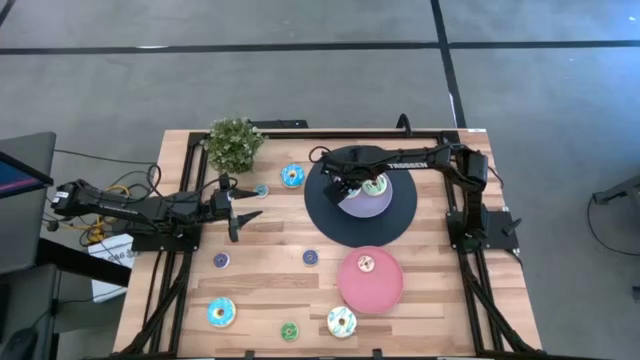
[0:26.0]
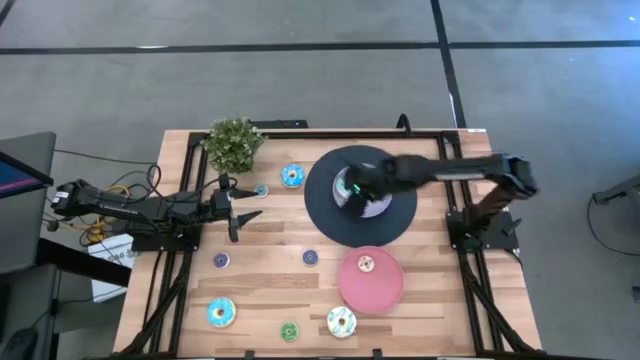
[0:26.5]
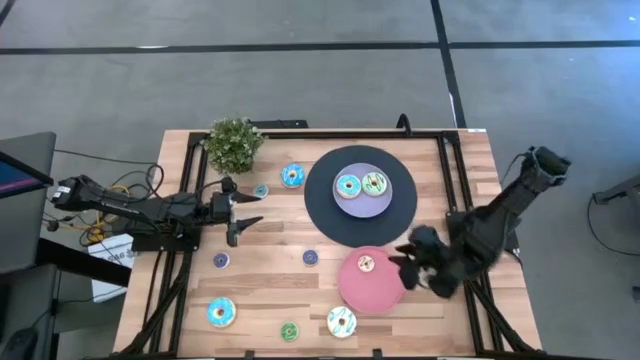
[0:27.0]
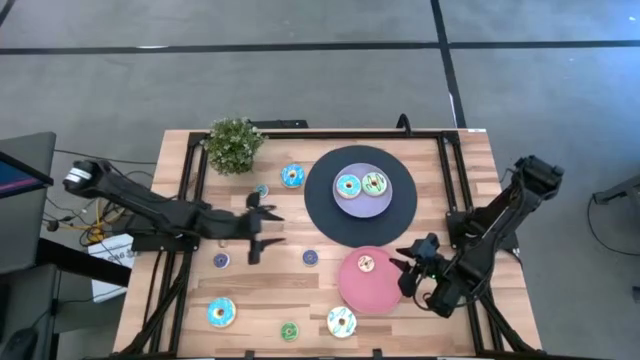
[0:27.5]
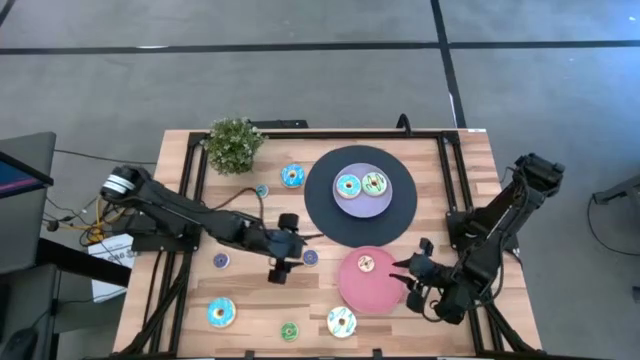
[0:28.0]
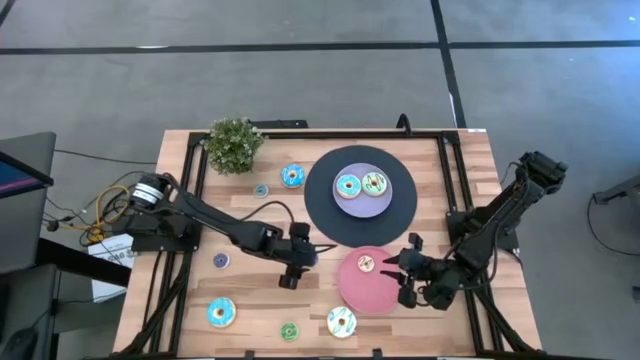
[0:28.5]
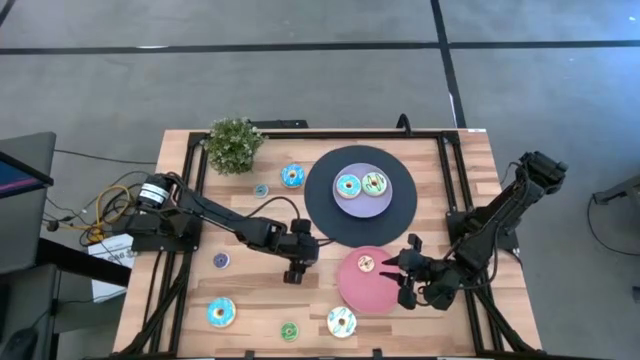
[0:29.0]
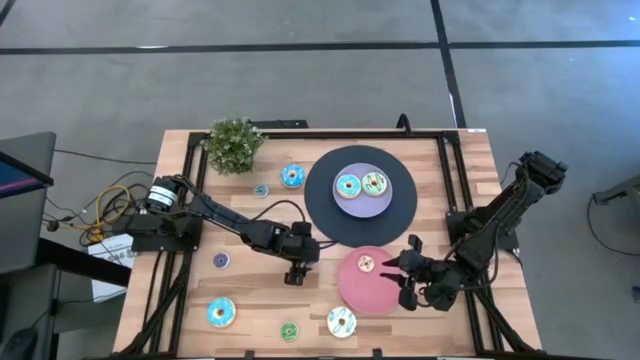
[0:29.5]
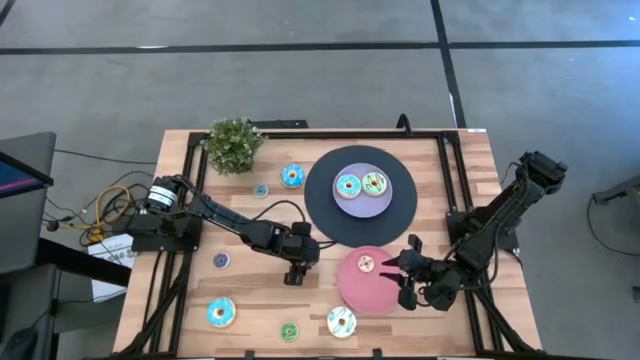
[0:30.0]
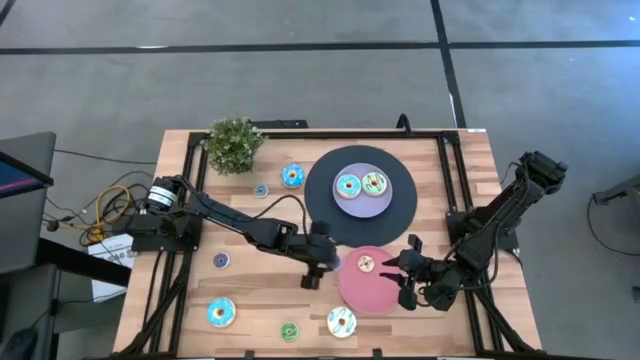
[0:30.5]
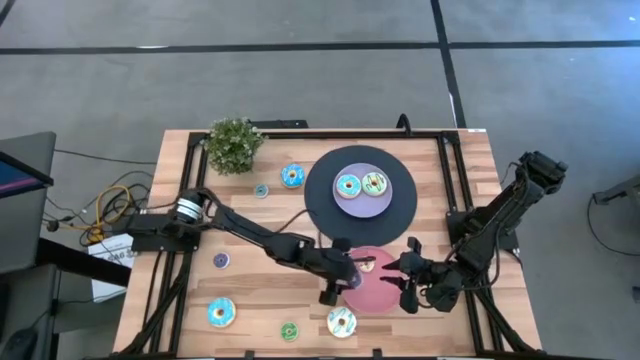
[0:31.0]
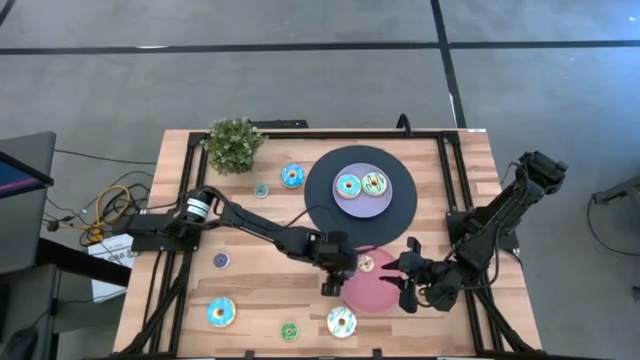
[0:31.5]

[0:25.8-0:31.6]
Task: Pick & Place donuts
Put the right small purple donut into the pink plate

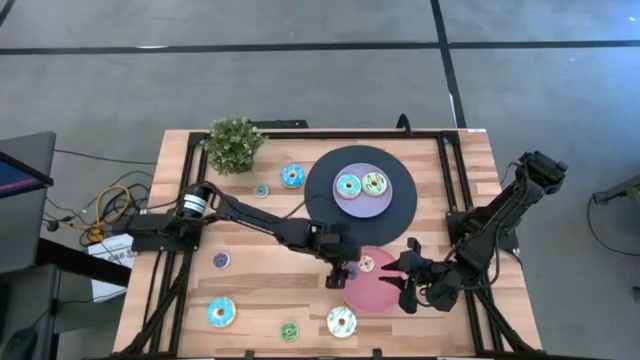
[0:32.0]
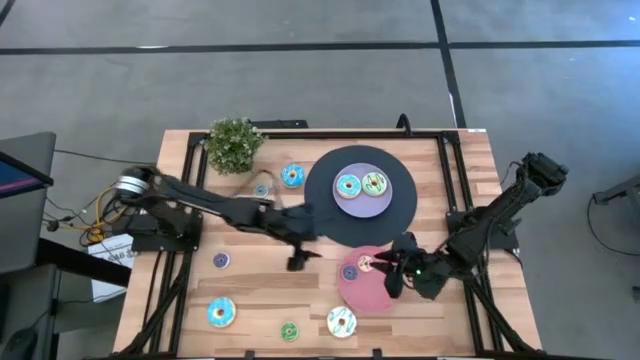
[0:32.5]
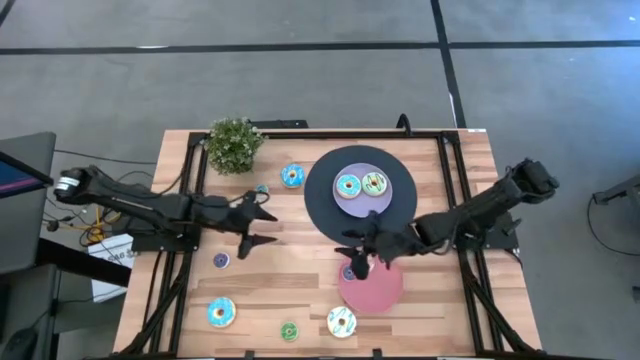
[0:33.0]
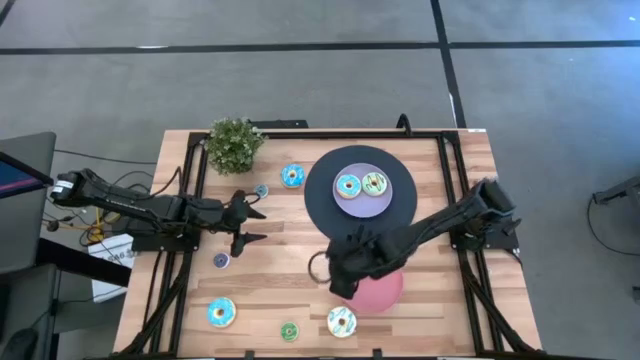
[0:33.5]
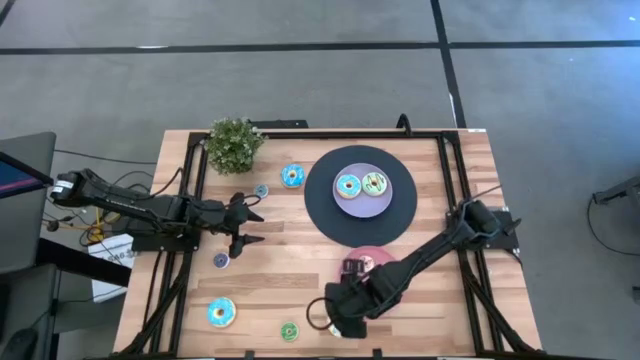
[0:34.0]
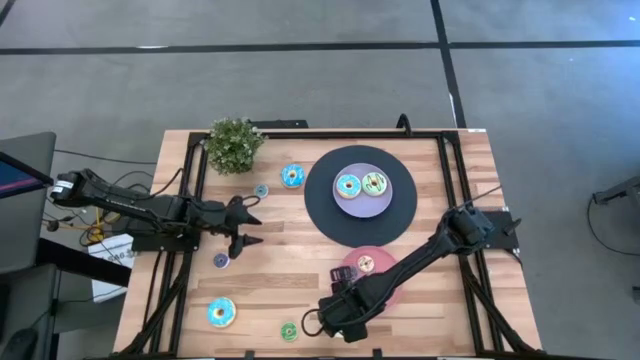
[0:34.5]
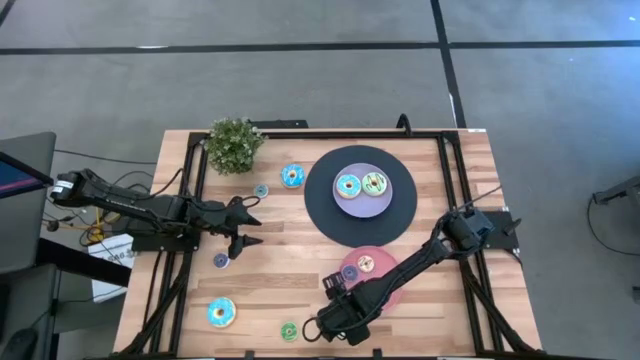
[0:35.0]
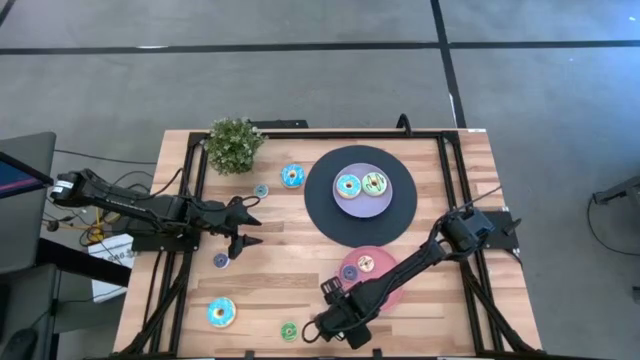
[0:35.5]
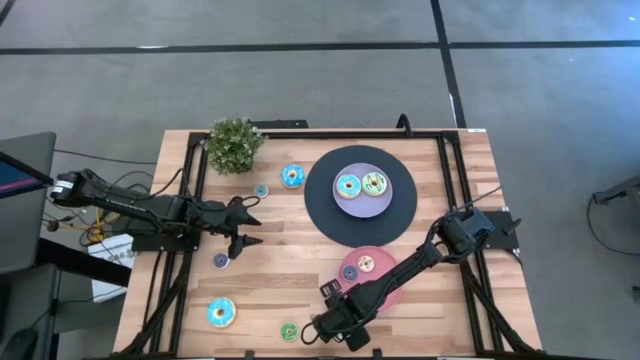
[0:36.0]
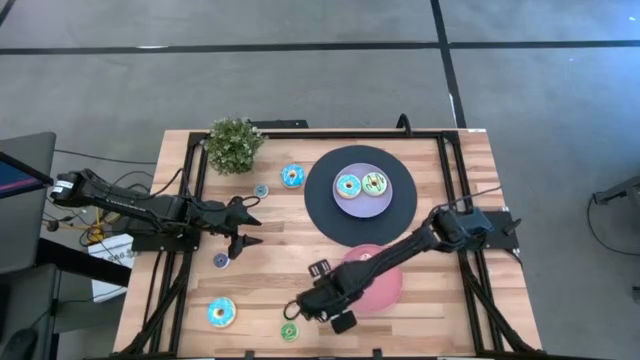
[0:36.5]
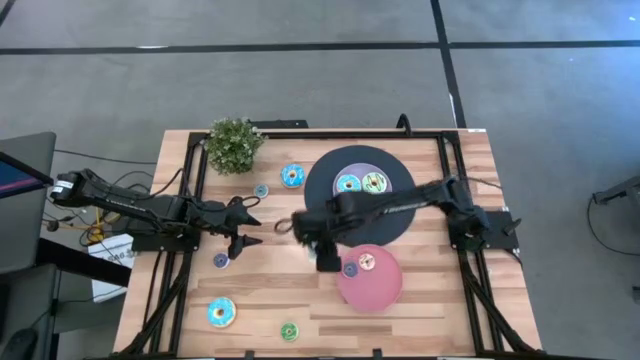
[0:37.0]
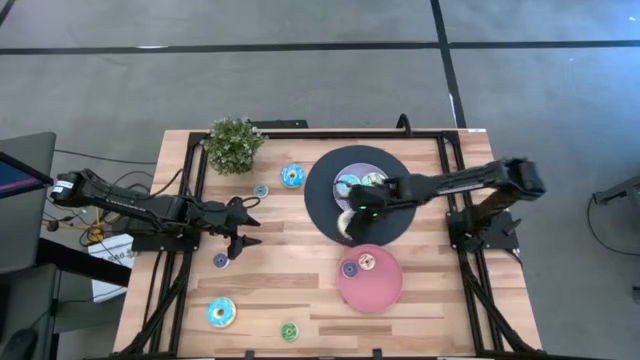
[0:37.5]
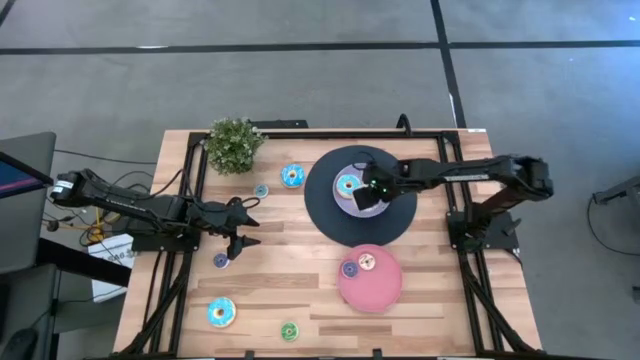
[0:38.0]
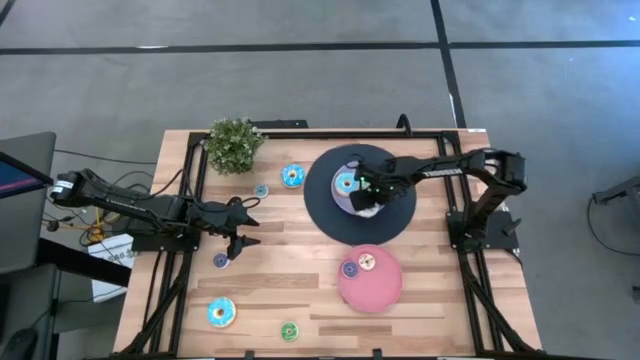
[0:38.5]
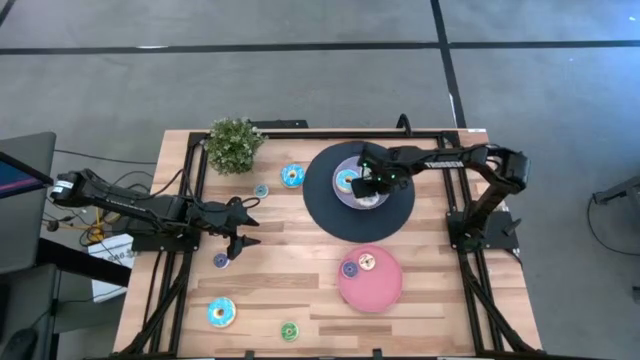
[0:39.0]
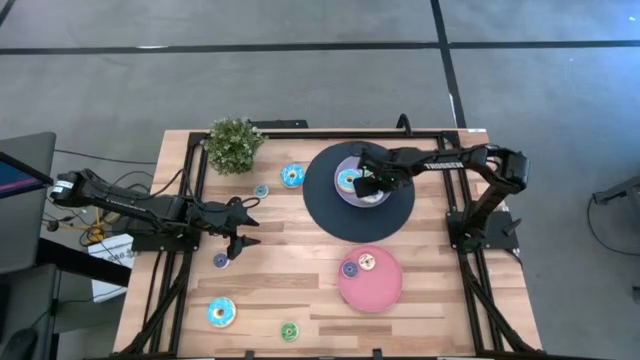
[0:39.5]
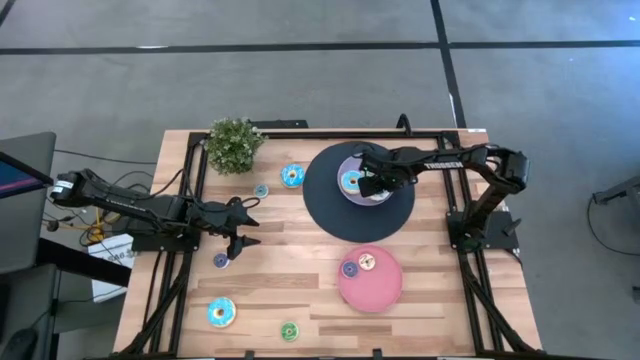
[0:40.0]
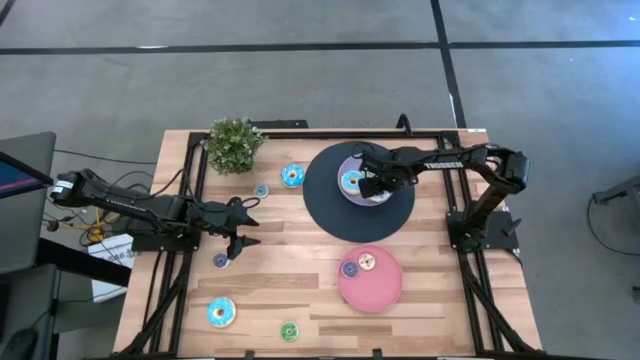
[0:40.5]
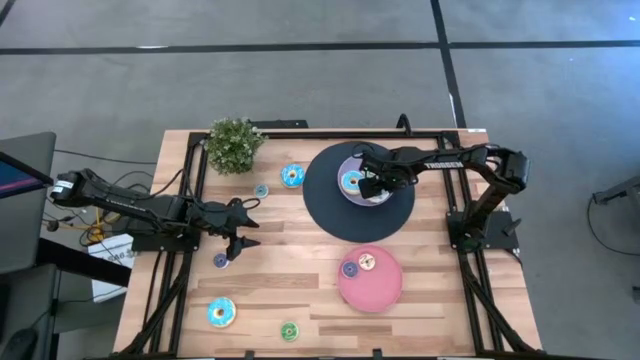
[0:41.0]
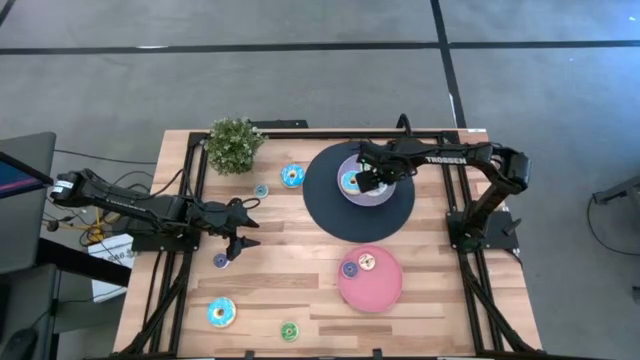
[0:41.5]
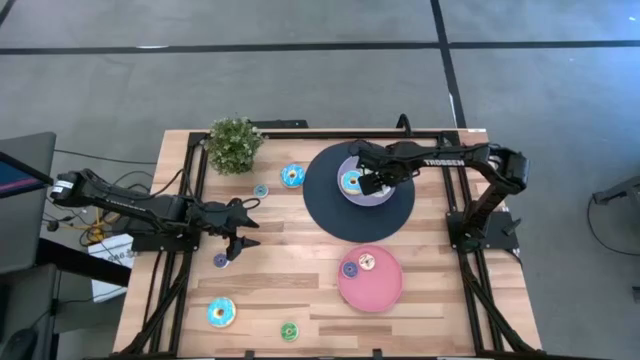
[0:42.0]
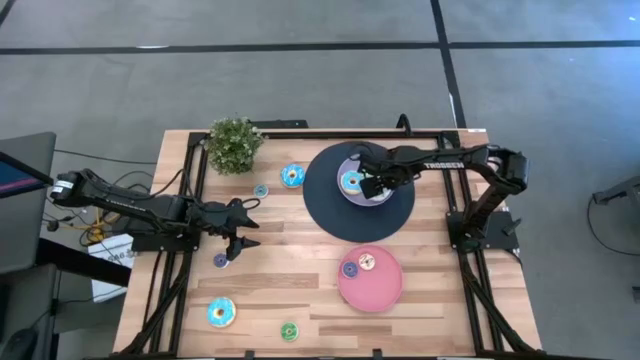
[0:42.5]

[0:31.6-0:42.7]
Put the big white donut into the purple plate

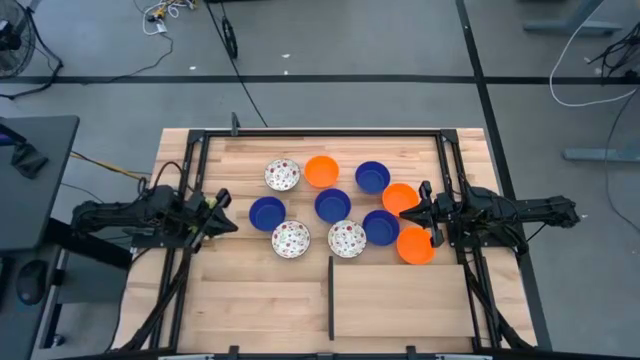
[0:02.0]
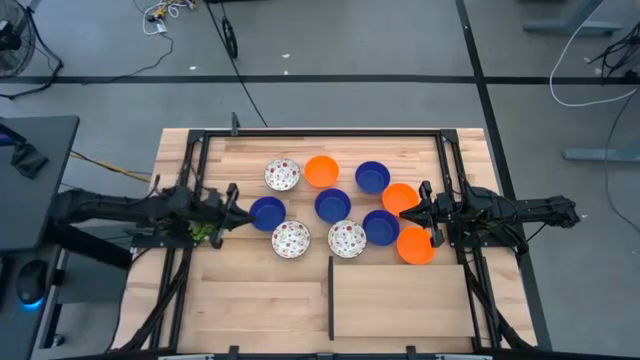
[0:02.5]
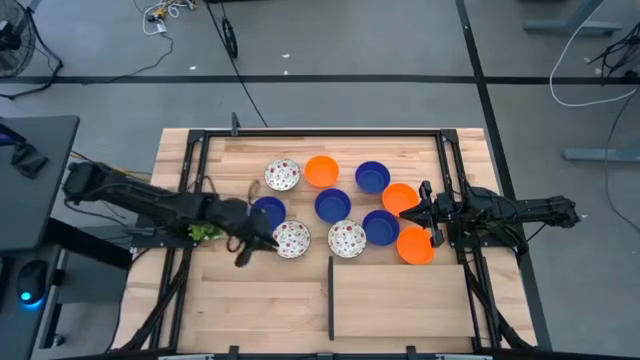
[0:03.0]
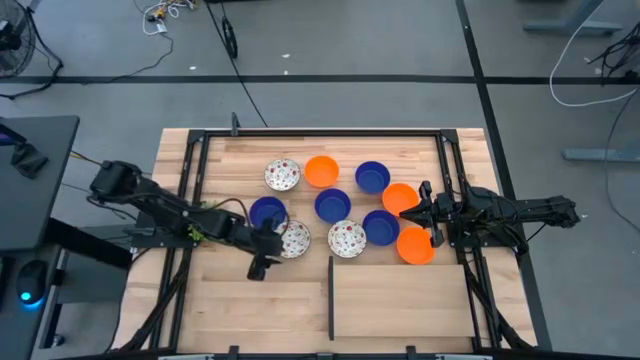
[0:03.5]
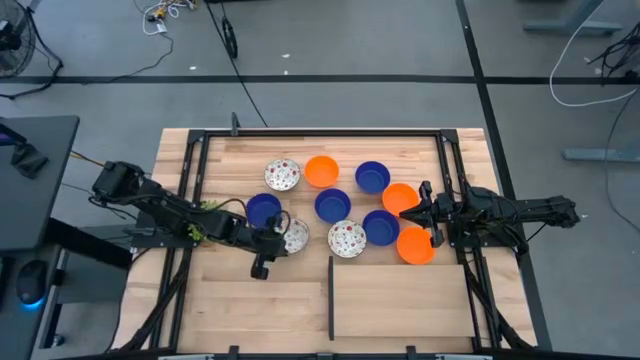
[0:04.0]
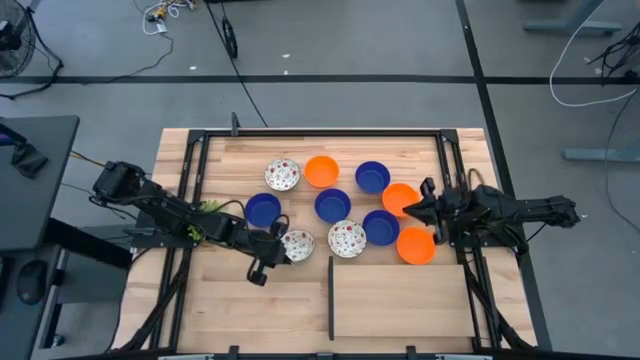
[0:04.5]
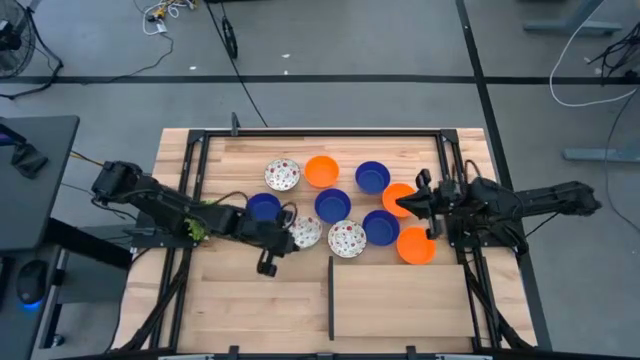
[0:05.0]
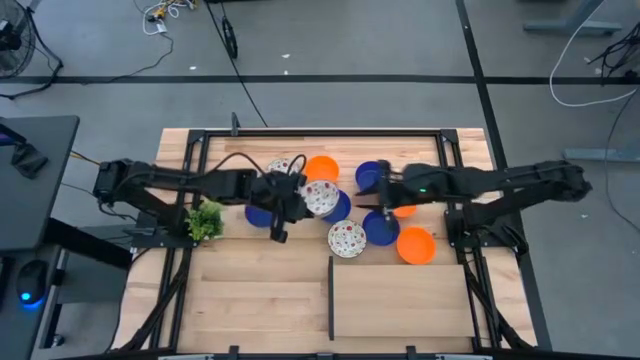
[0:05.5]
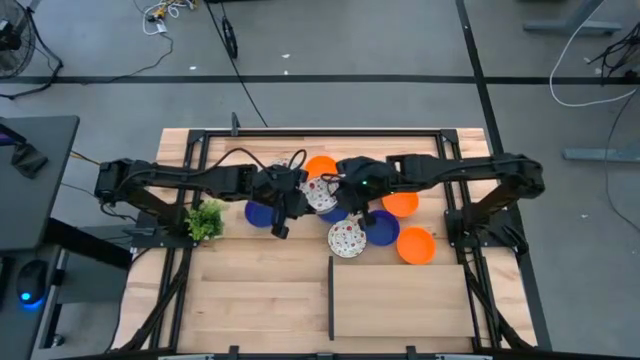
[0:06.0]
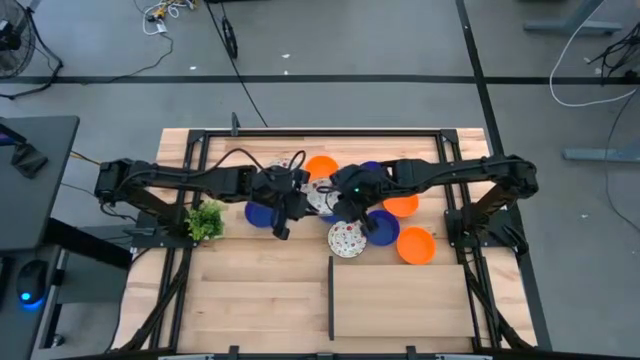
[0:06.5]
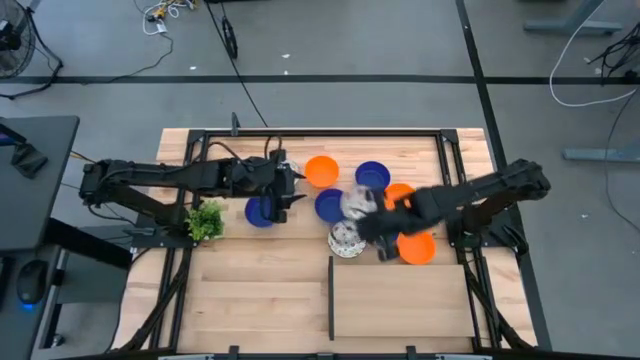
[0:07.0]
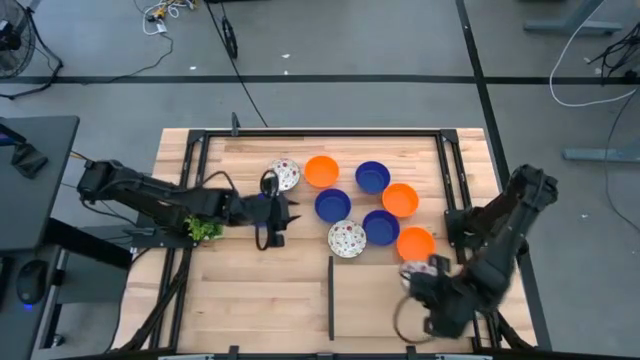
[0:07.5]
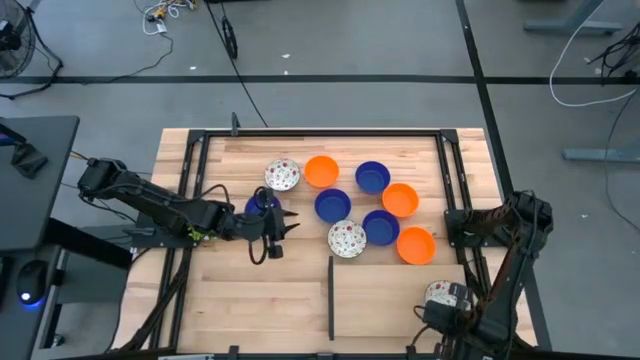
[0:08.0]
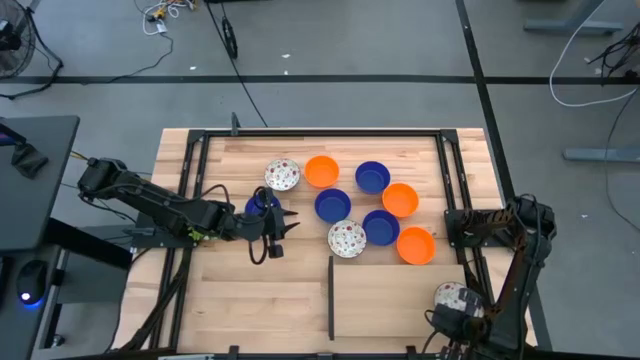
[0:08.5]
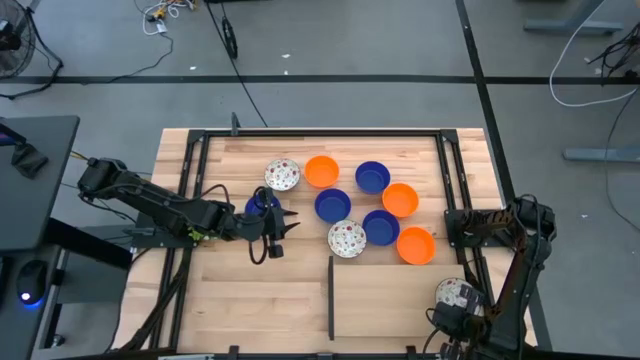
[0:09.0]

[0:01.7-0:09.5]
Task: Pick & Place Mini bowls
Put the bottom white bowl on the shelf
